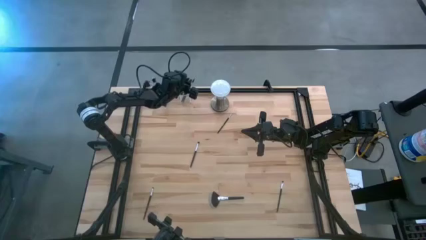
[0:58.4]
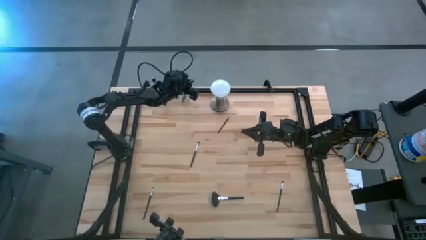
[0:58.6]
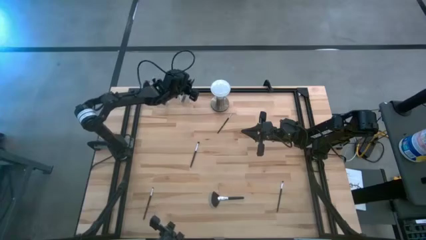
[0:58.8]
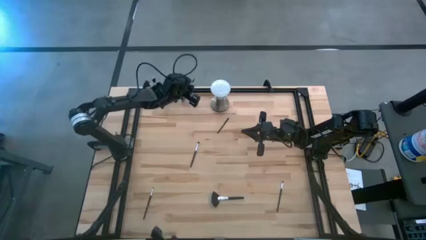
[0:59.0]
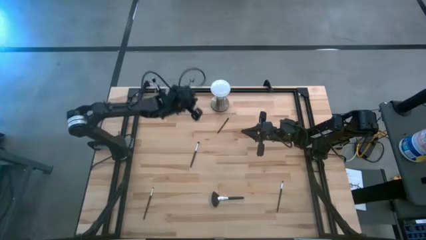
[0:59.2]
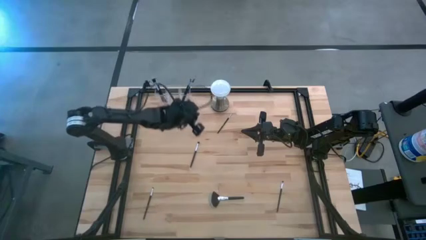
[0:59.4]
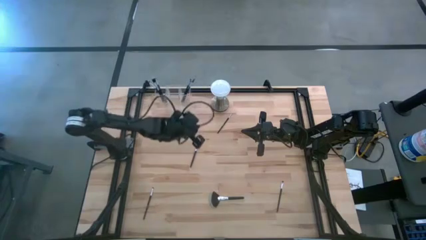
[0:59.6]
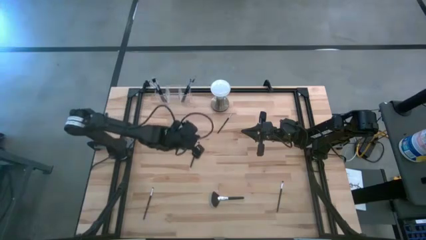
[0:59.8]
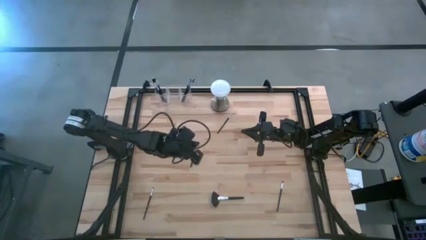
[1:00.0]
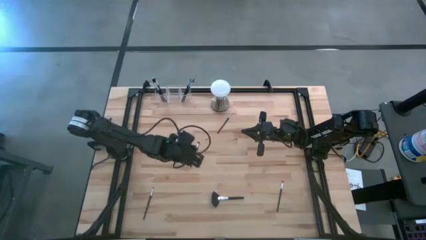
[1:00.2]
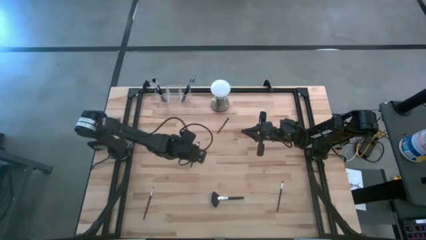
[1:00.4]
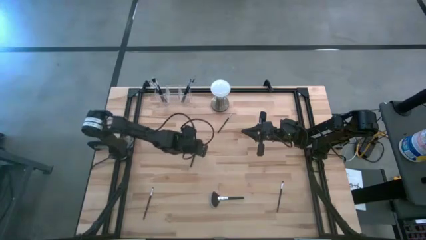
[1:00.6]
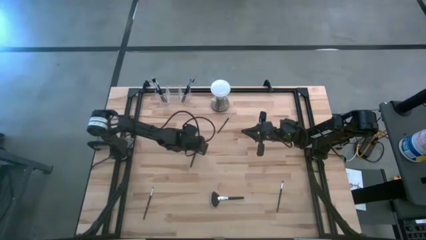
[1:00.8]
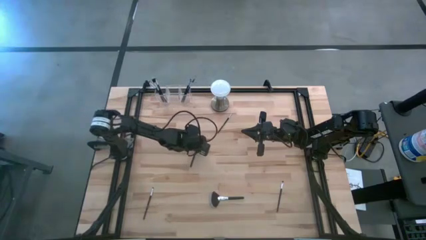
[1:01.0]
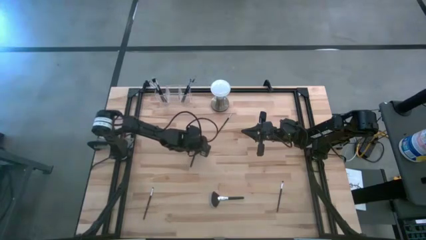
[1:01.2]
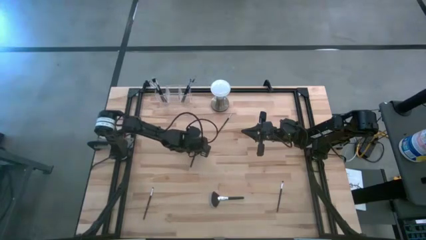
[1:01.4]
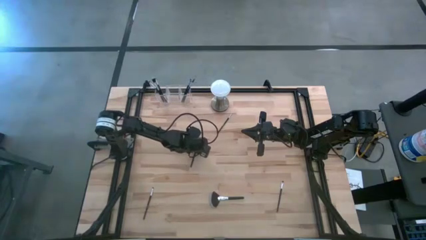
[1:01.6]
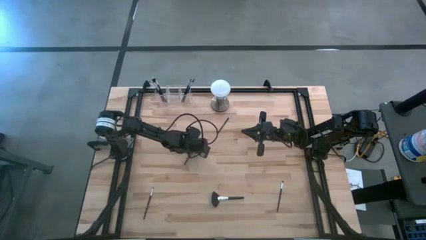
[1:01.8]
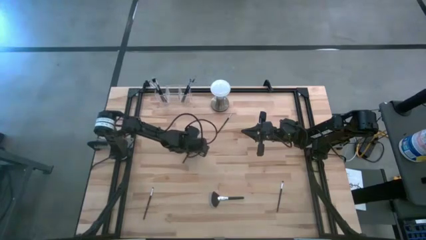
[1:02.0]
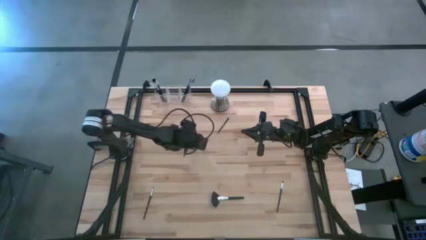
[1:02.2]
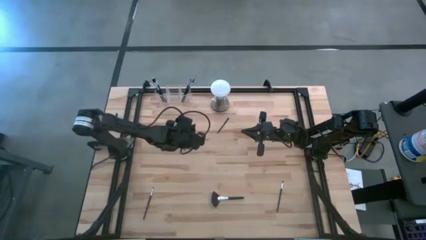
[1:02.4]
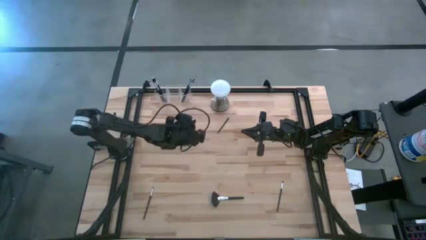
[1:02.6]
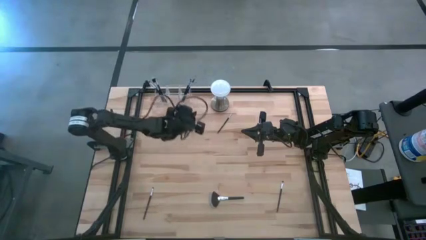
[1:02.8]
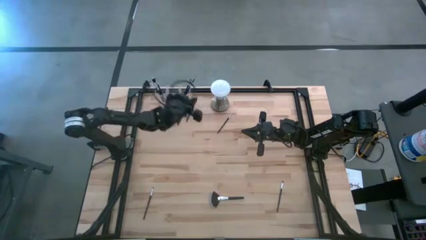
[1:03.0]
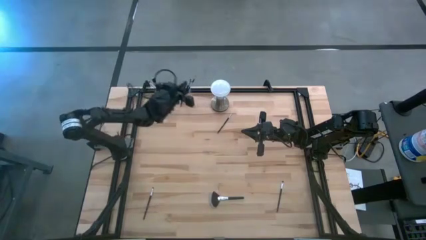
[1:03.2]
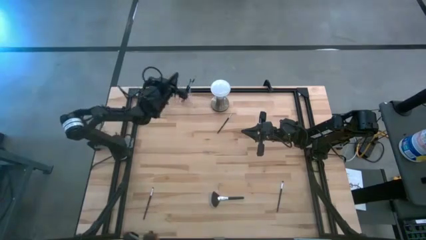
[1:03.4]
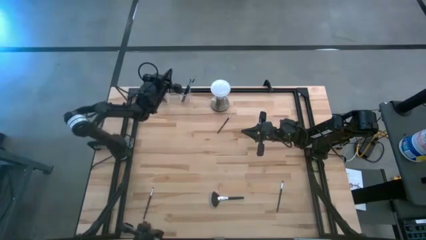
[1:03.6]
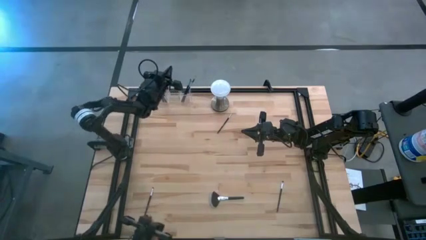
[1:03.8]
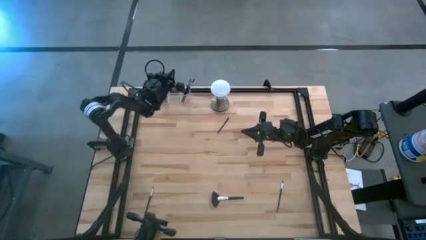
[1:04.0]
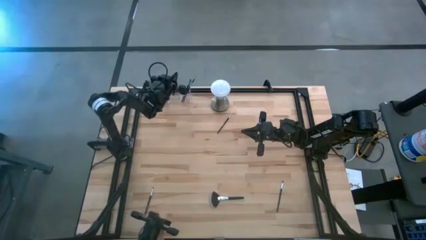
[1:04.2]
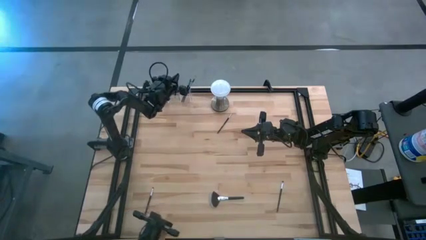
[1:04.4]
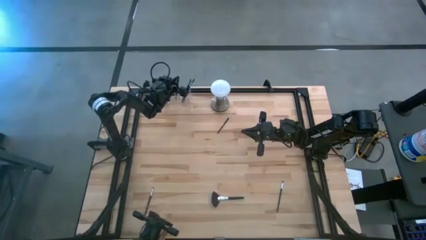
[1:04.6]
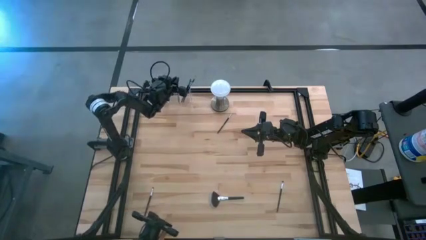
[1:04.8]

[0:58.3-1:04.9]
Task: Put items in baskets/containers
Put the eyeshadow brush into the middle section of the transparent organizer

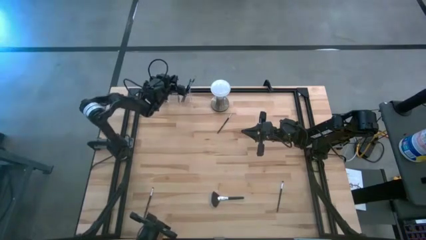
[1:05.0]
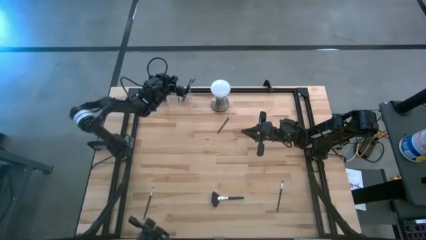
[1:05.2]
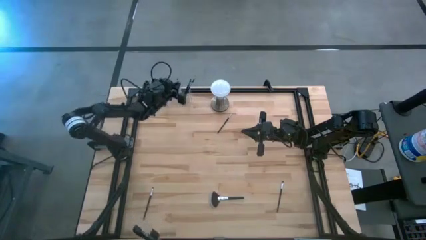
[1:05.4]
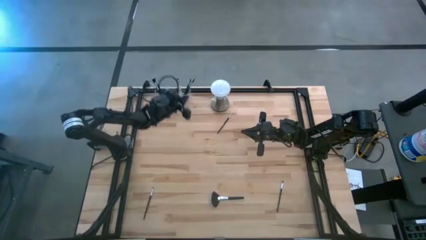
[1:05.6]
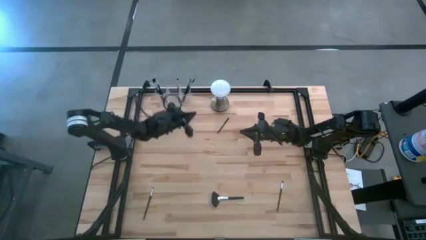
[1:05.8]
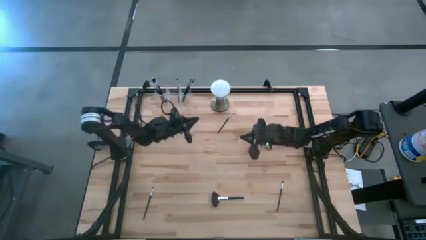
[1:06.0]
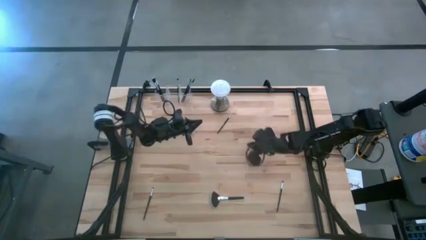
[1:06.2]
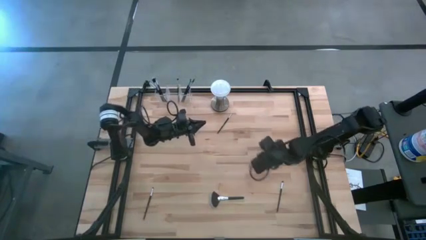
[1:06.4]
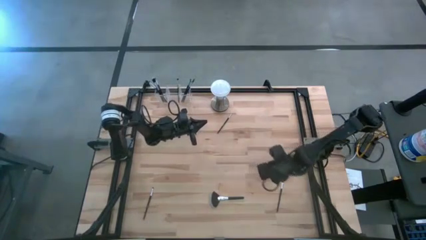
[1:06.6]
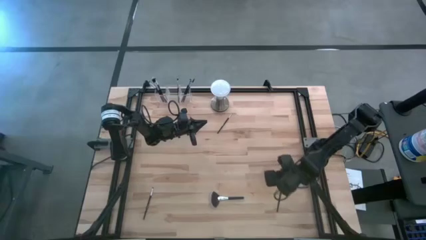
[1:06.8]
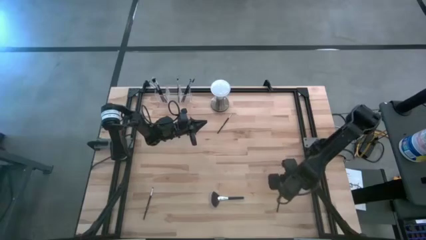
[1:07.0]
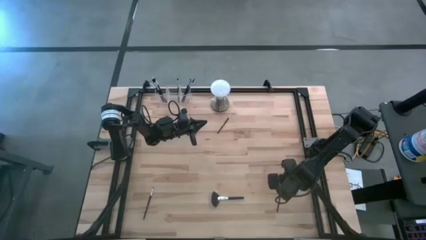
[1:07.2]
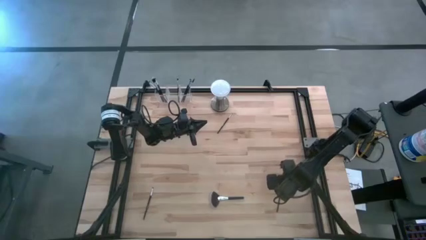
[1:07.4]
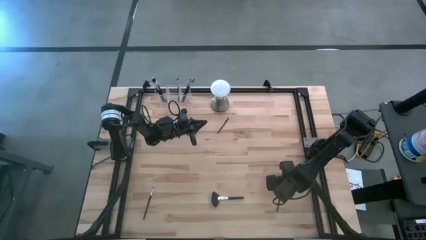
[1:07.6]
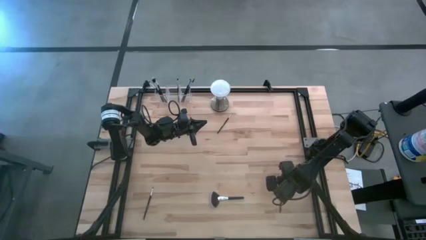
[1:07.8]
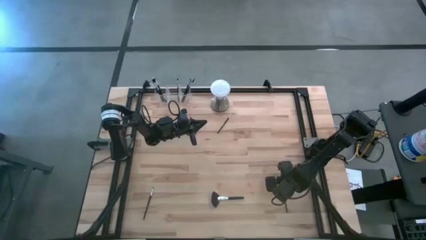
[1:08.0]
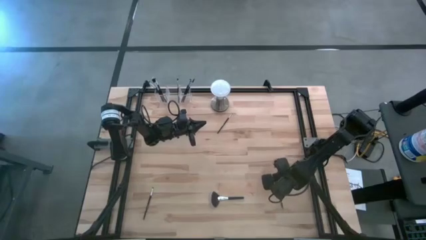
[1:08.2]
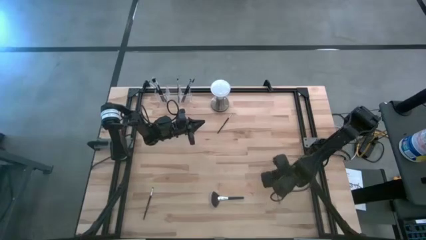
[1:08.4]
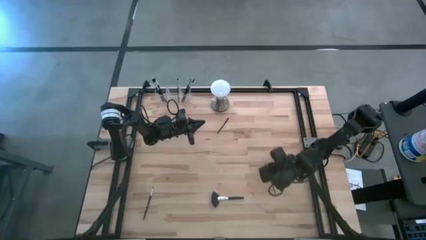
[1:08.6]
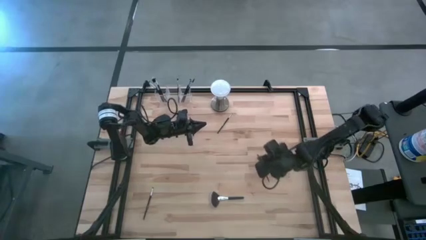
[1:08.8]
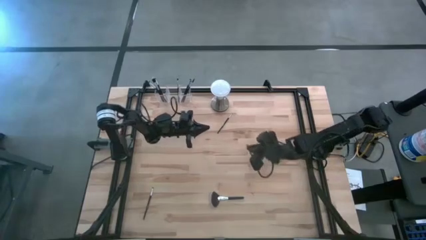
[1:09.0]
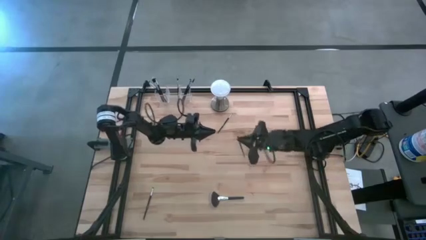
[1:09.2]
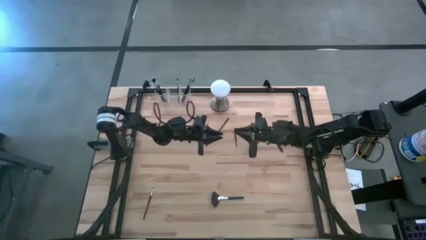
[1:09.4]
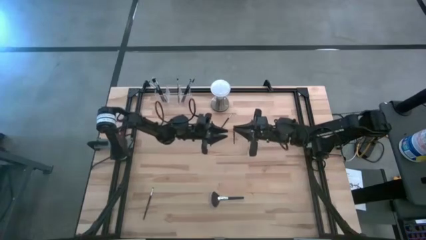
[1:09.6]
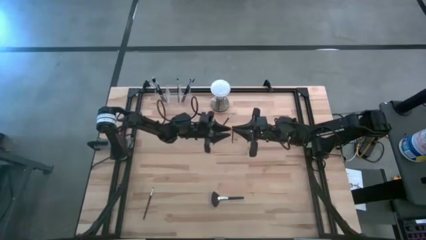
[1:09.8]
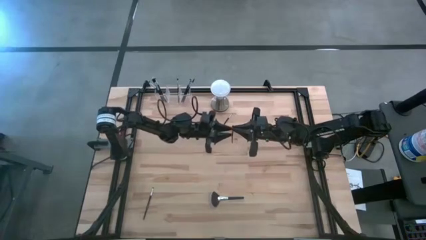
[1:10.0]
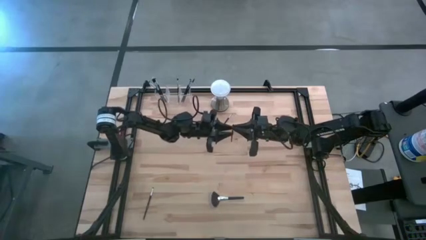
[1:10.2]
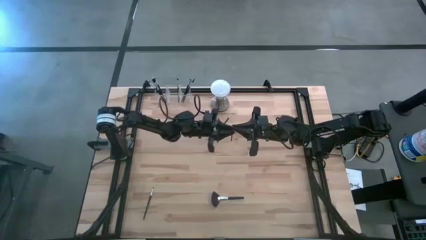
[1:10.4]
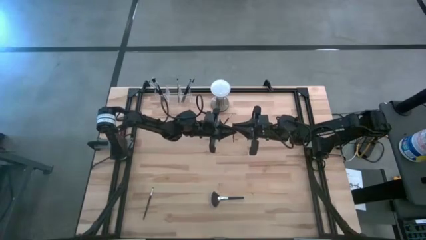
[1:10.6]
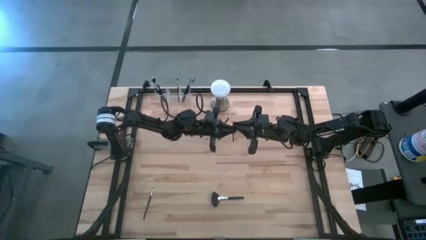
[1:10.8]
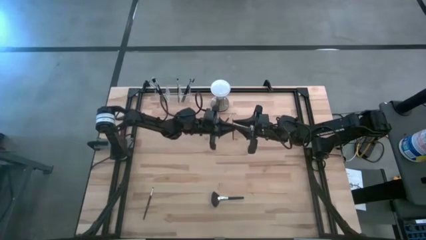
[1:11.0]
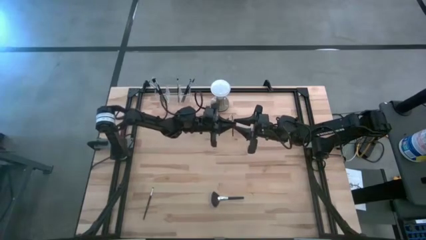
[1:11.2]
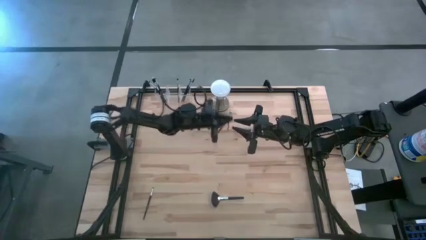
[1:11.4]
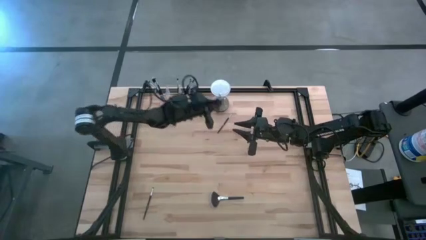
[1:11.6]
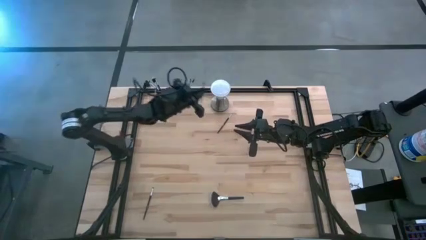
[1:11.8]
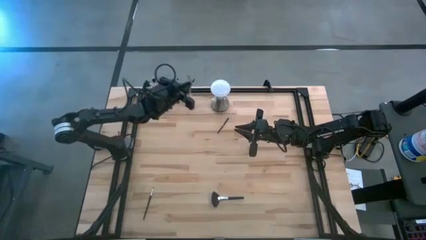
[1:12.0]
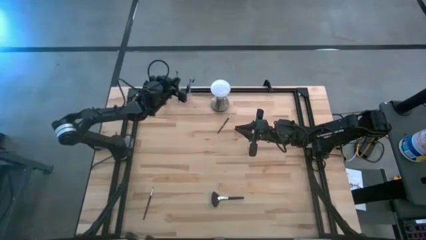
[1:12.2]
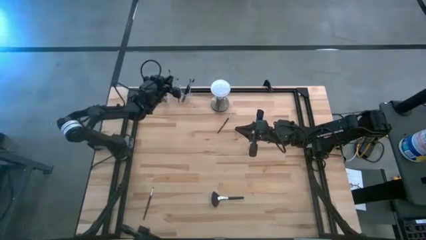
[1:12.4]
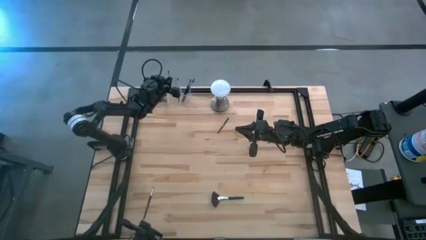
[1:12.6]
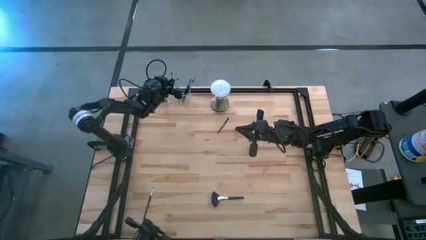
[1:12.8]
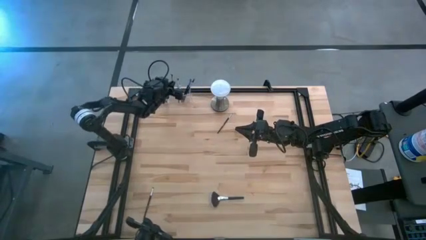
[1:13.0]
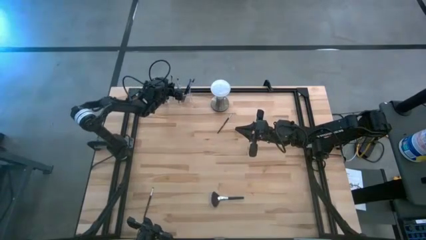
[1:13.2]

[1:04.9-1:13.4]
Put the eyeshadow brush into the middle section of the transparent organizer

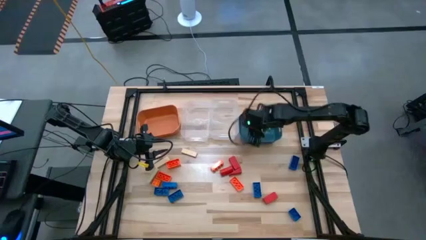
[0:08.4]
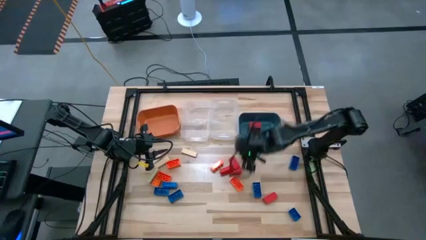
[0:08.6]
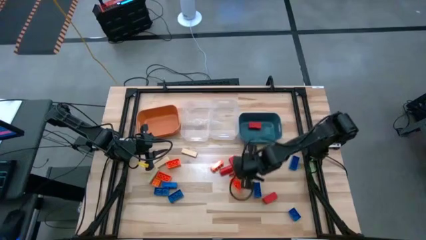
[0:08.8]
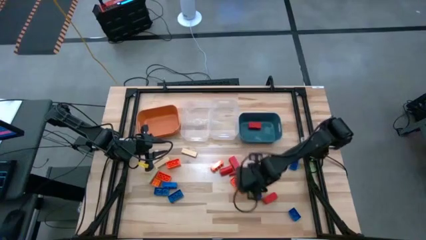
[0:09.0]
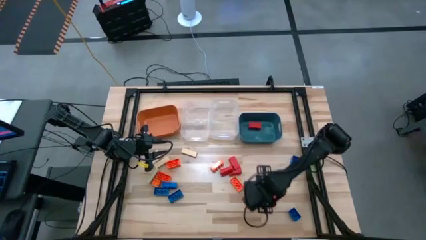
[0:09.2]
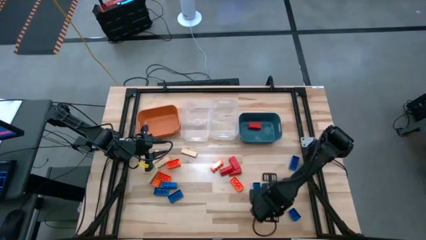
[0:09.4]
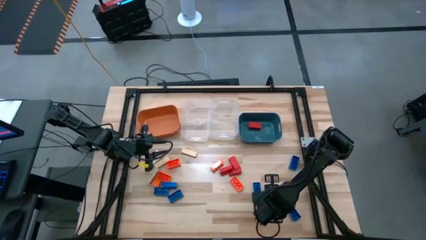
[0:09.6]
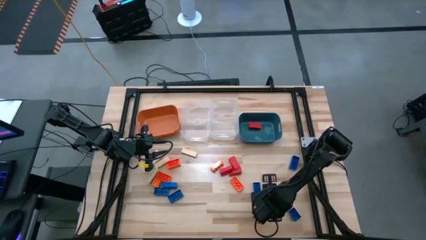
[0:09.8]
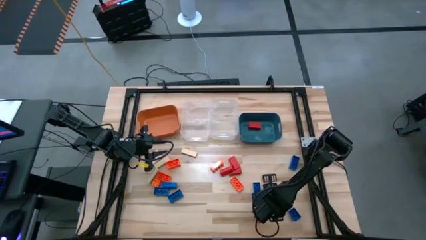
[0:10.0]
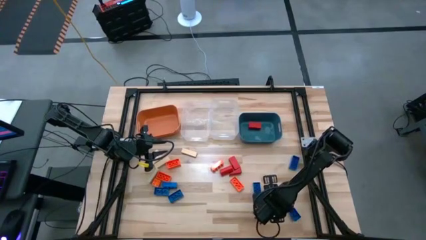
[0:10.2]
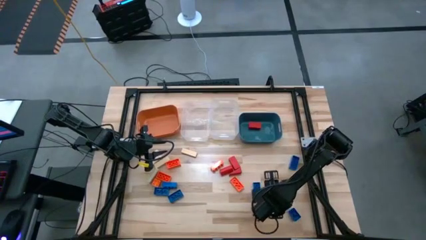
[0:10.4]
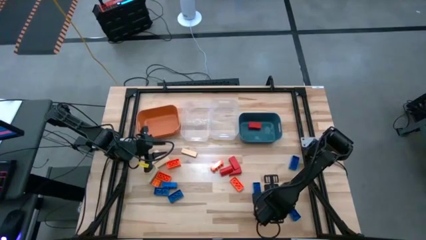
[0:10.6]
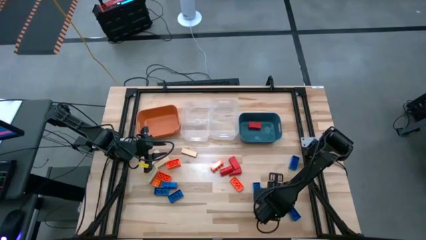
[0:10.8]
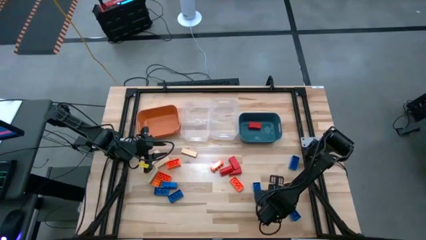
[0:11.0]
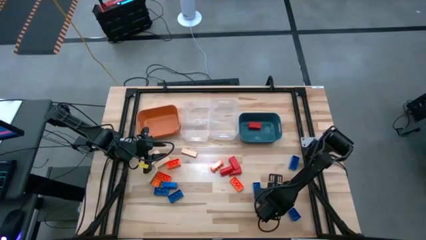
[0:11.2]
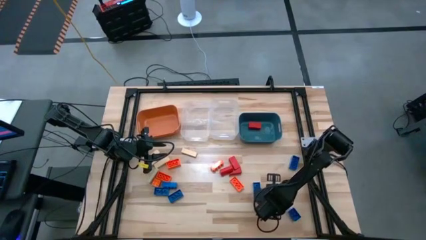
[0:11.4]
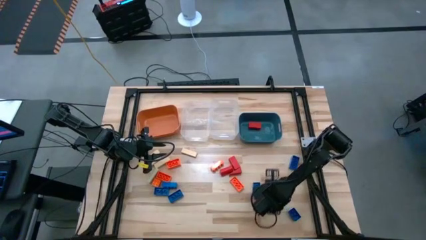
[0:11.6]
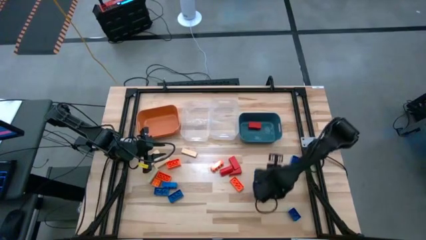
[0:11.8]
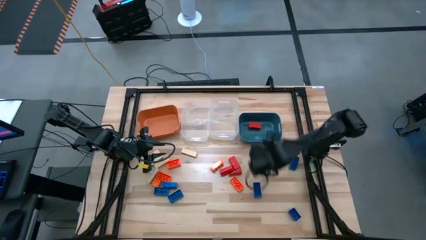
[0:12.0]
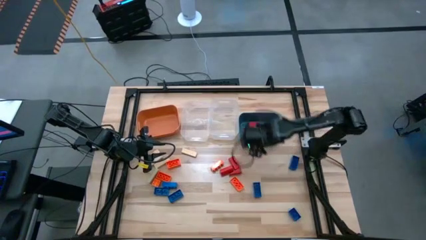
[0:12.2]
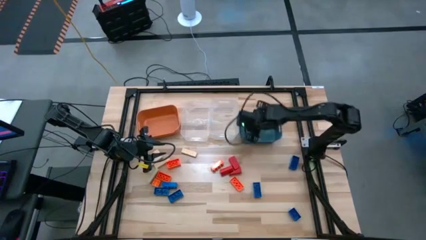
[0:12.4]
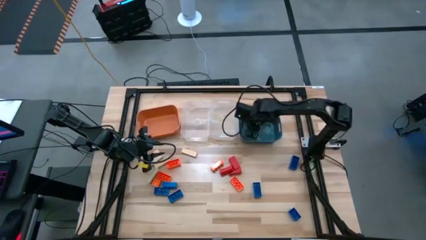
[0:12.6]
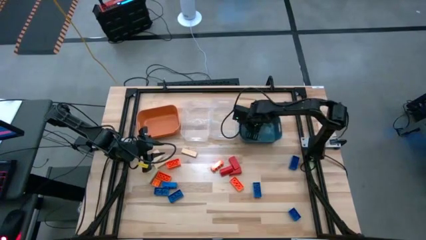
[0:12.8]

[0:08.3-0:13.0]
Task: Sort blocks
Put the red block into the blue bin
